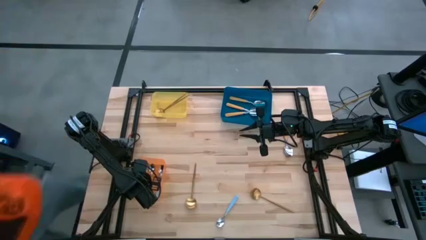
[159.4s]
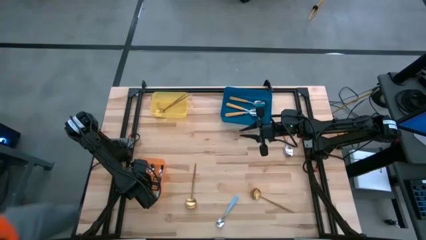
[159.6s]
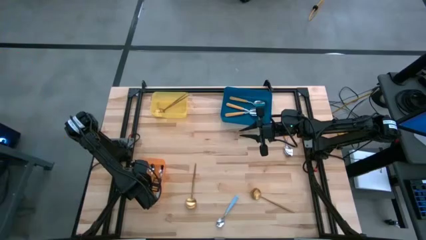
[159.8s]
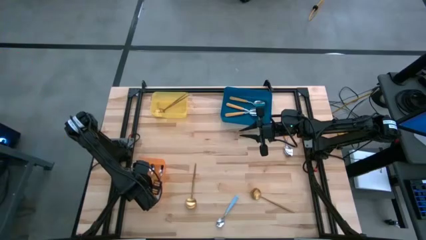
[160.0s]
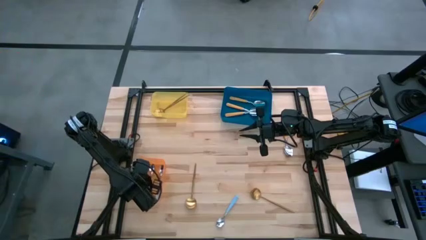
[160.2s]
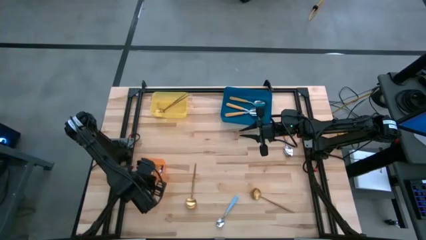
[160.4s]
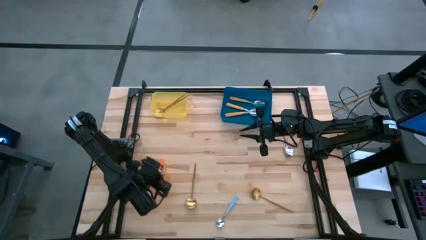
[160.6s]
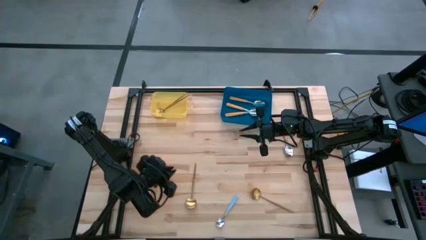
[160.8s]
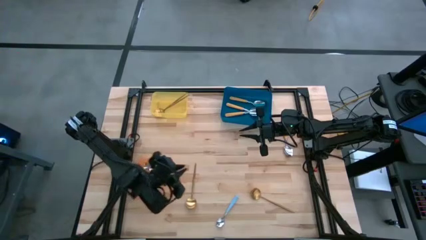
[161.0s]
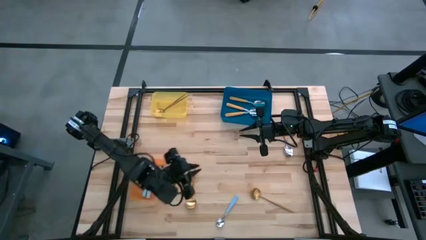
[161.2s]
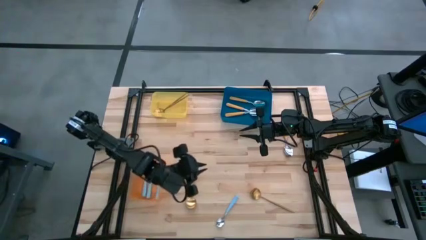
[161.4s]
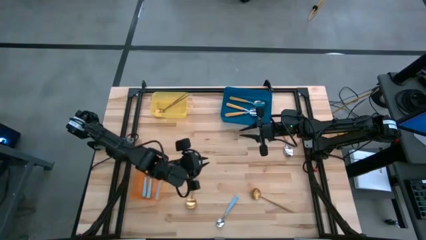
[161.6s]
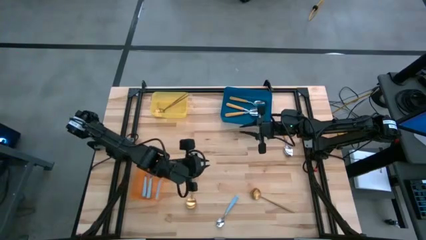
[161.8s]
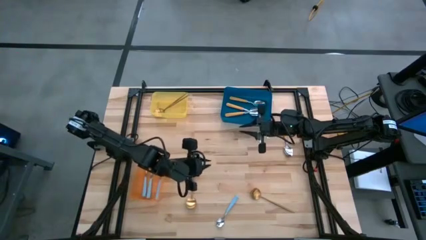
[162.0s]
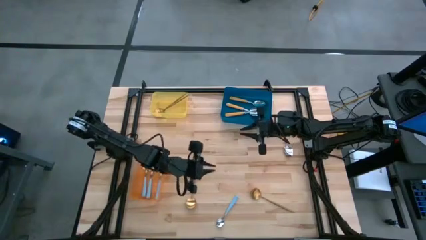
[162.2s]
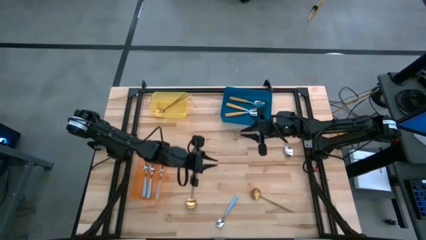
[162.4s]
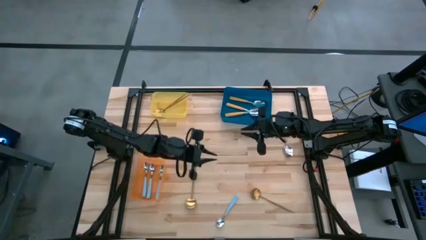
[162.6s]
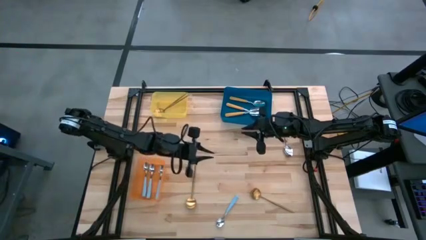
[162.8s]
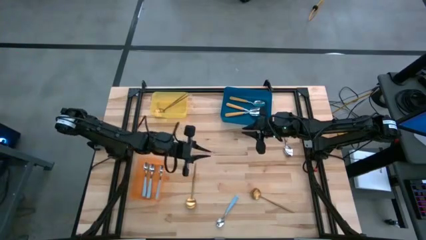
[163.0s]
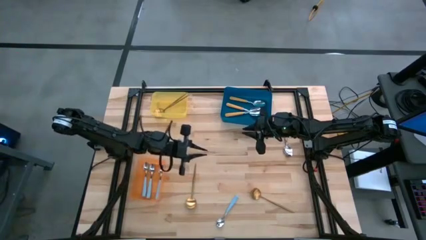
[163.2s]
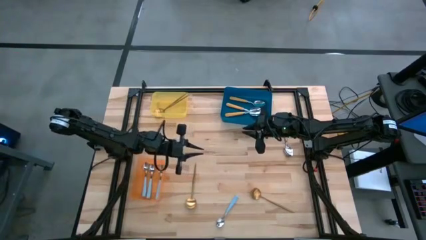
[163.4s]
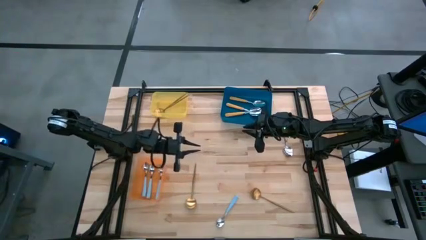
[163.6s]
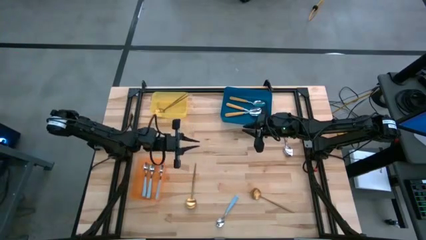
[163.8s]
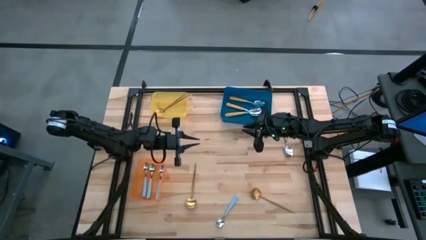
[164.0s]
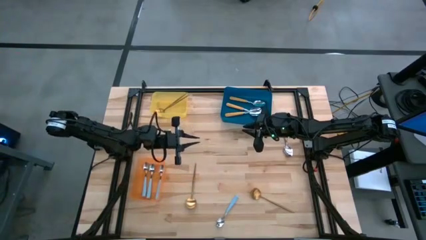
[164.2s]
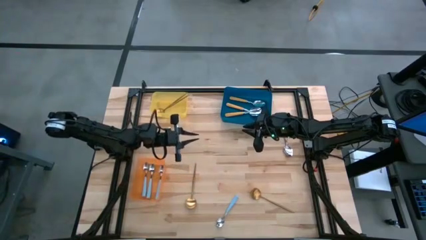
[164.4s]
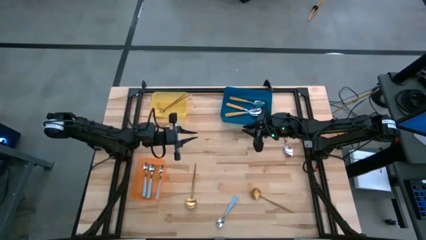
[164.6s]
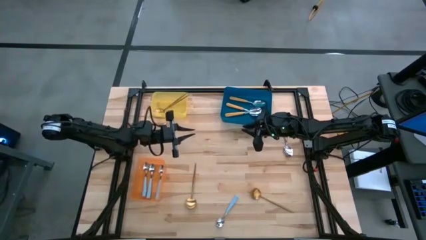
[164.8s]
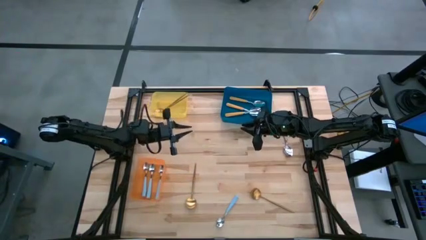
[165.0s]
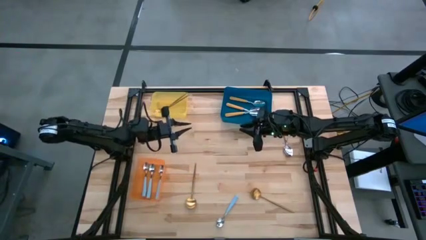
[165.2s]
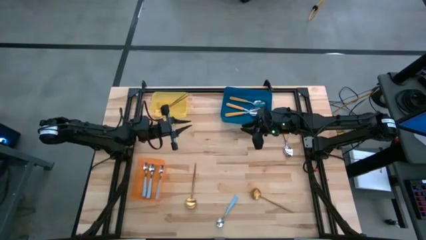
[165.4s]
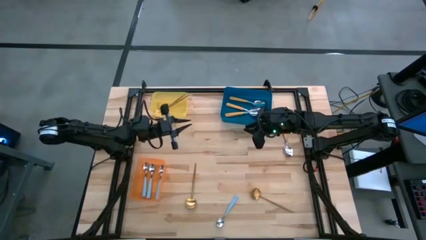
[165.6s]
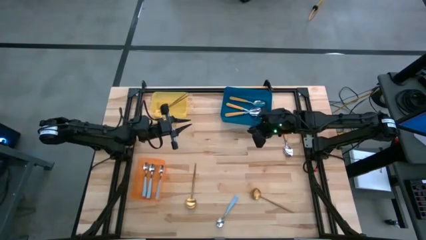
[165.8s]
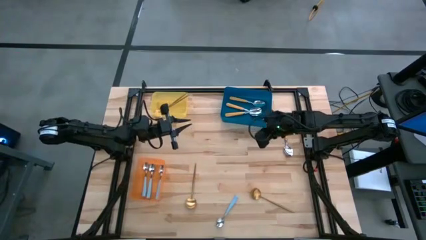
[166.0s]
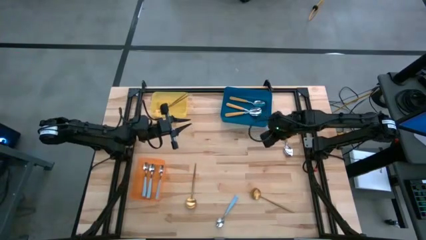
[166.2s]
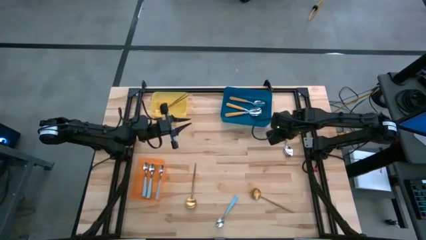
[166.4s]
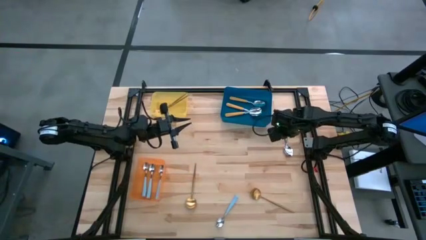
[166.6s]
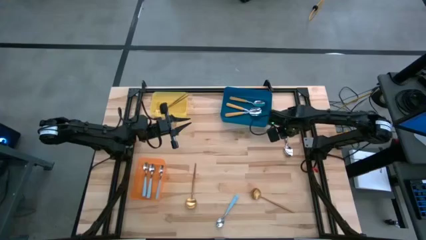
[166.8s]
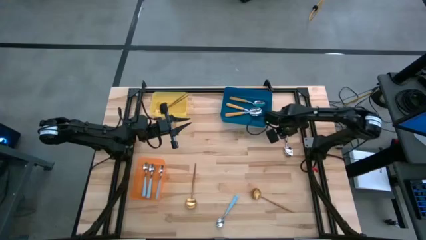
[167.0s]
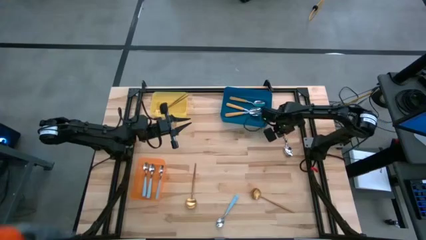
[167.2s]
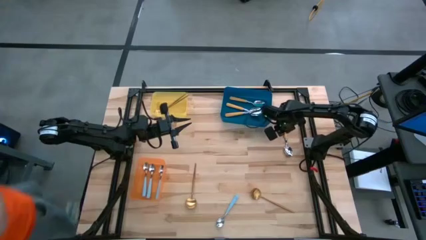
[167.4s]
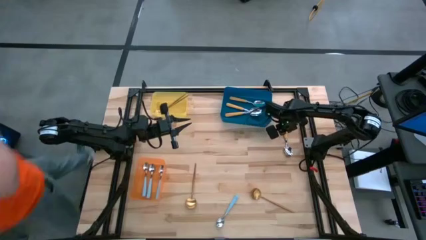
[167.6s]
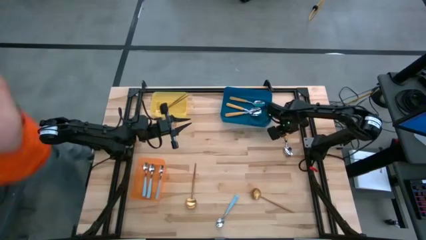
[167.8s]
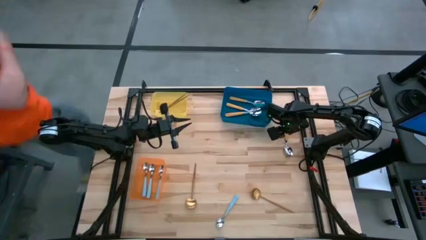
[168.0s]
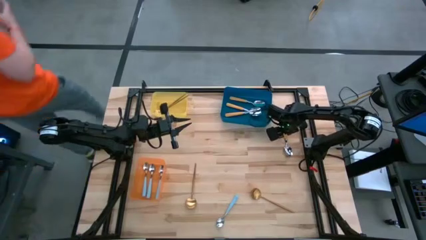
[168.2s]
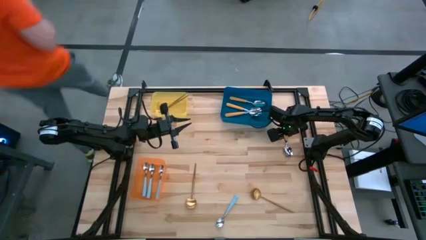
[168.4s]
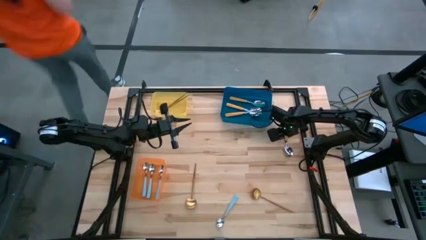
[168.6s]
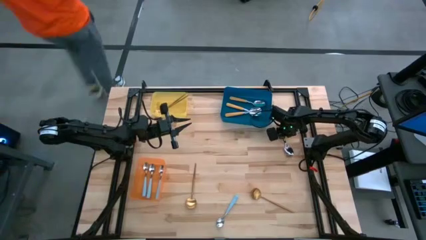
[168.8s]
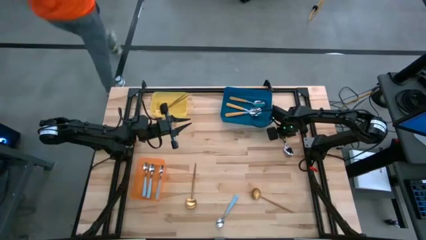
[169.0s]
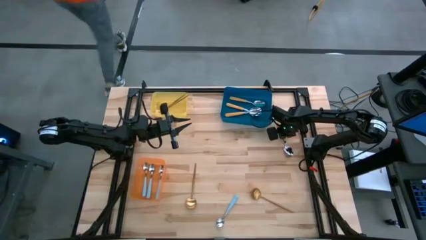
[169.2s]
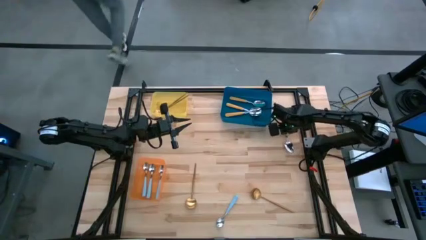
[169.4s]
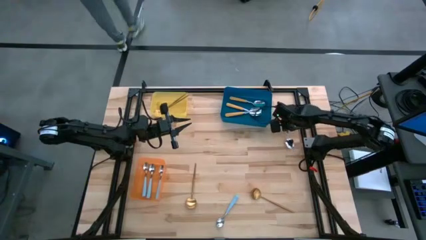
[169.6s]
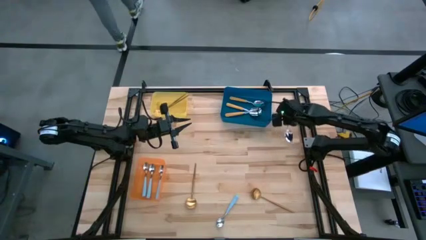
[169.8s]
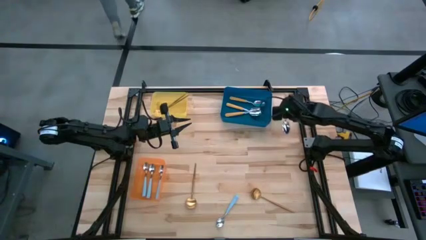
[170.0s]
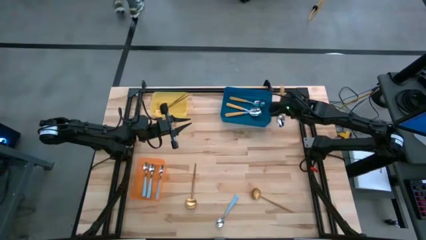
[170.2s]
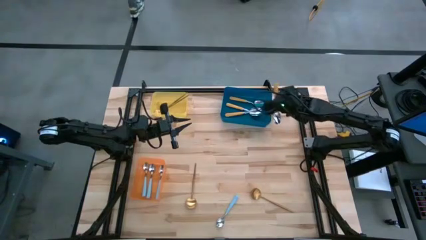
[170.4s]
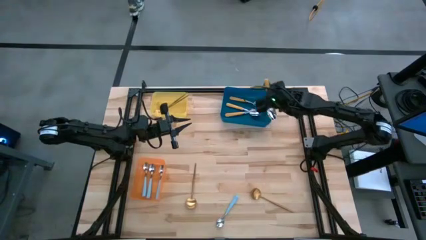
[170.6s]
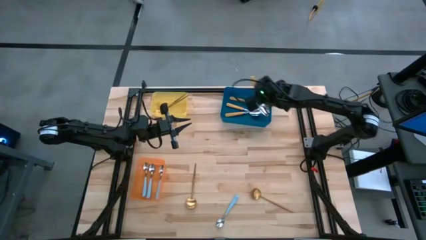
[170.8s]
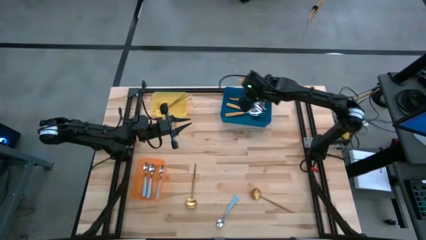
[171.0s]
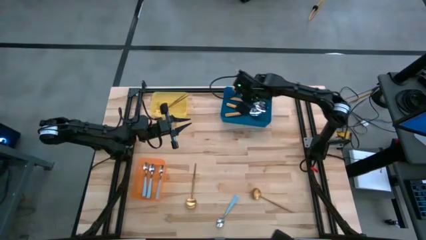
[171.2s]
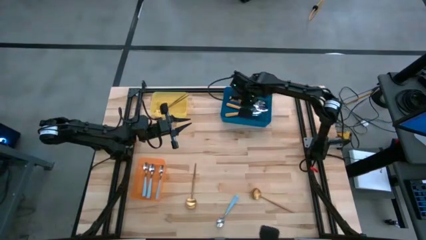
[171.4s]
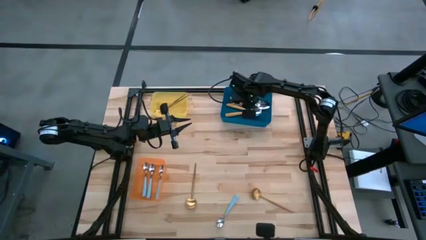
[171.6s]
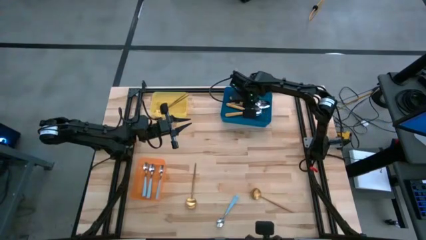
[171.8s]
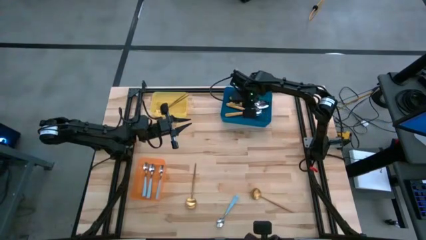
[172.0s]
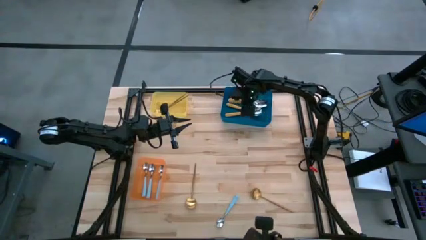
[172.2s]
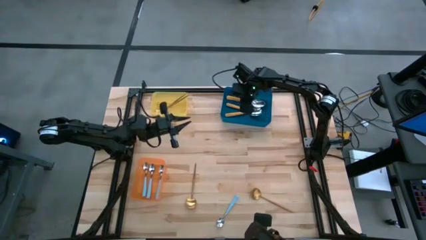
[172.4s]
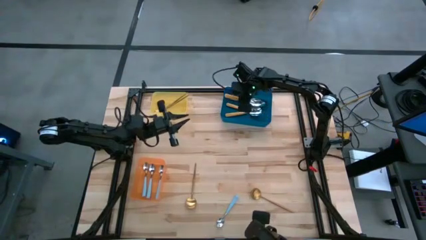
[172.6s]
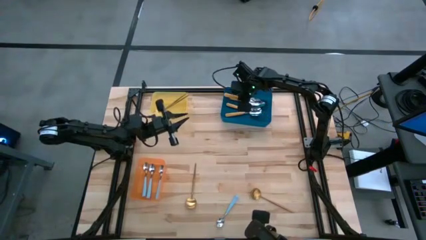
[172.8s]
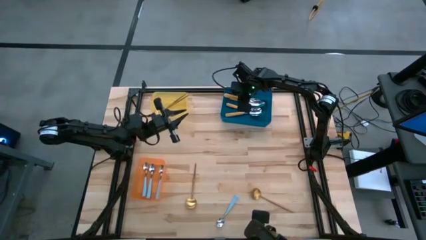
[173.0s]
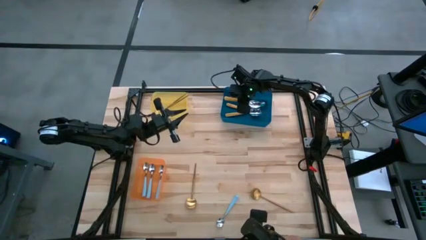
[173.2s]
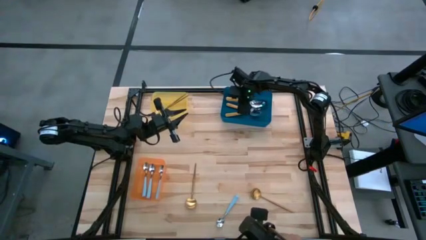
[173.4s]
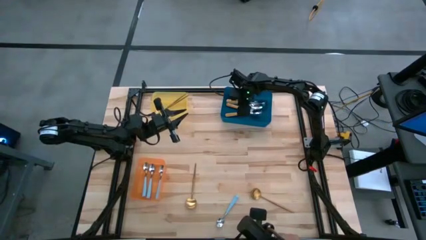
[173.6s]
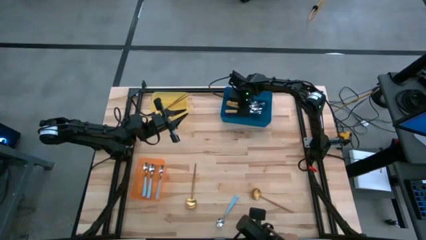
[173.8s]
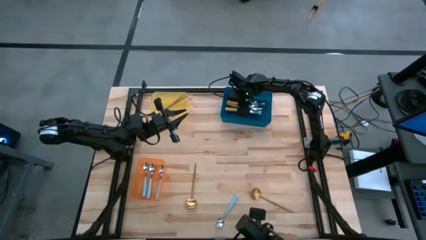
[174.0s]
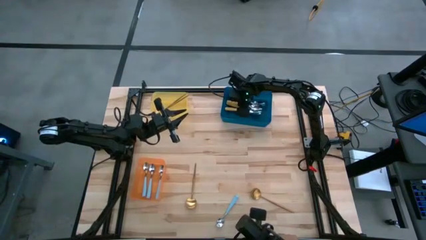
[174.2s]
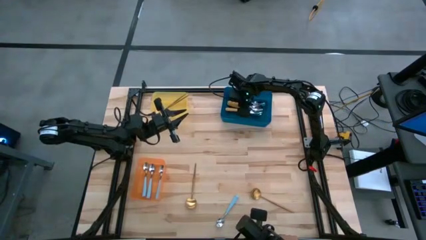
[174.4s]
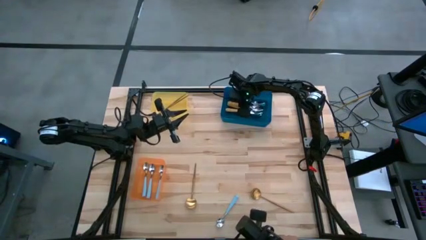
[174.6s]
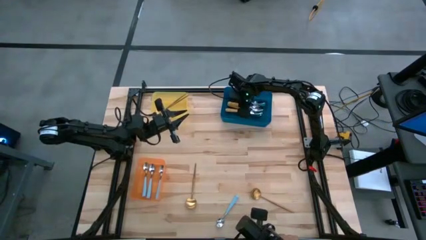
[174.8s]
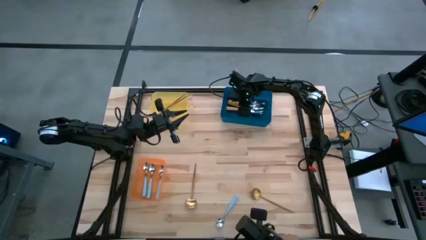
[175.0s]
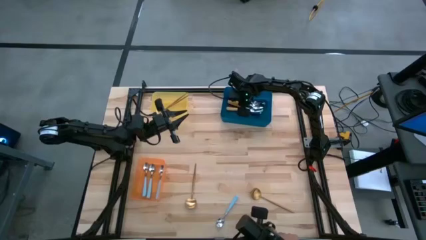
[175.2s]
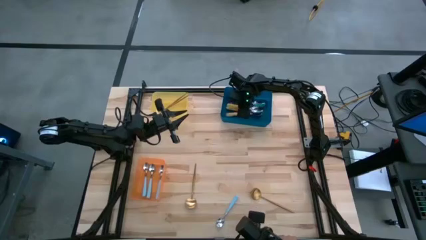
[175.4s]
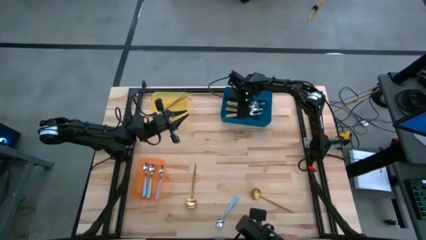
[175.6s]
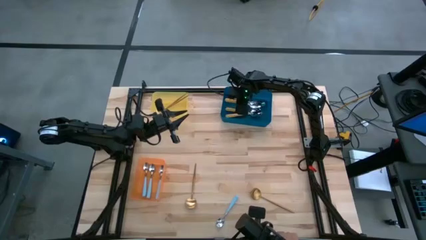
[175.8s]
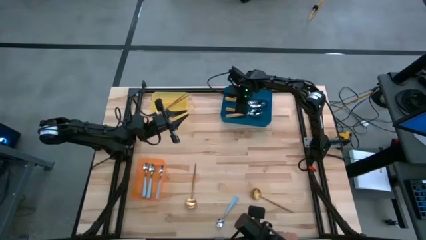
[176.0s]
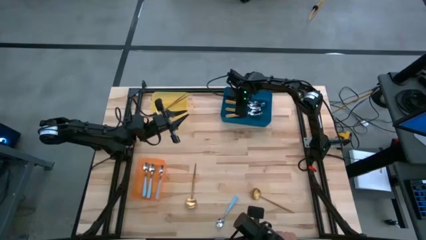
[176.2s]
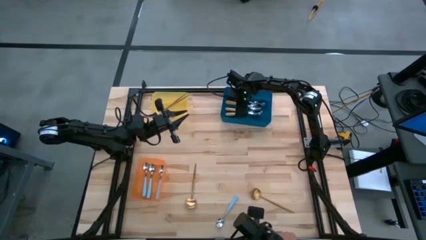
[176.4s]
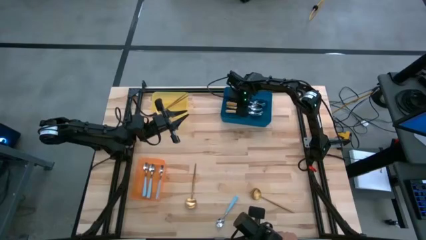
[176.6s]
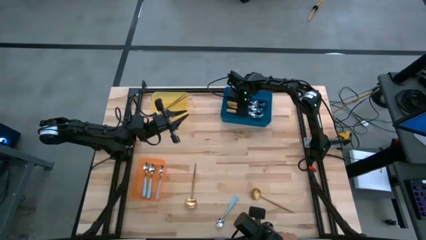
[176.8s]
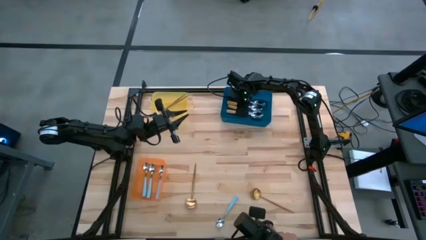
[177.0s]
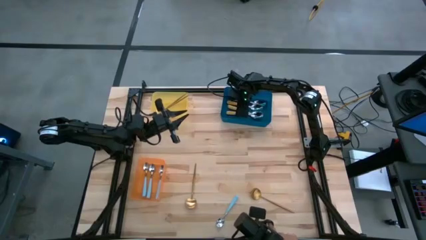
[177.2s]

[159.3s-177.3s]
Task: Sort silverware by color (type)
Put the orange spoon into the blue bin
